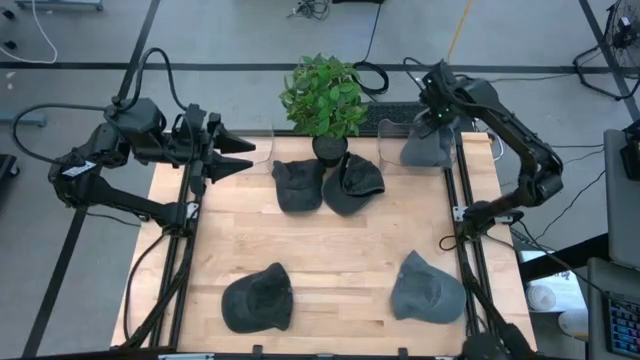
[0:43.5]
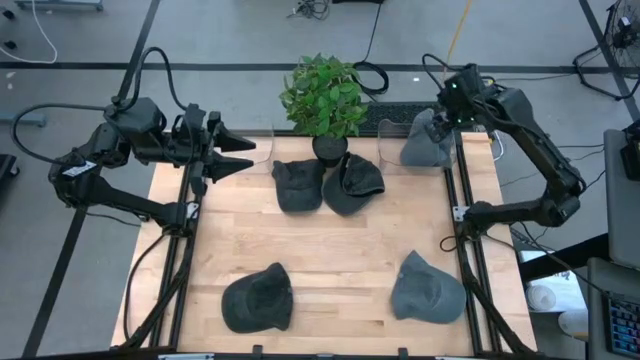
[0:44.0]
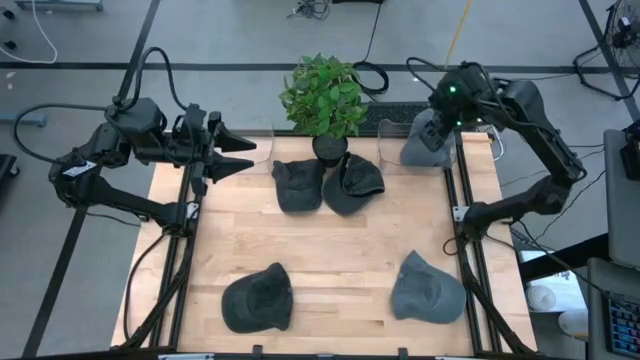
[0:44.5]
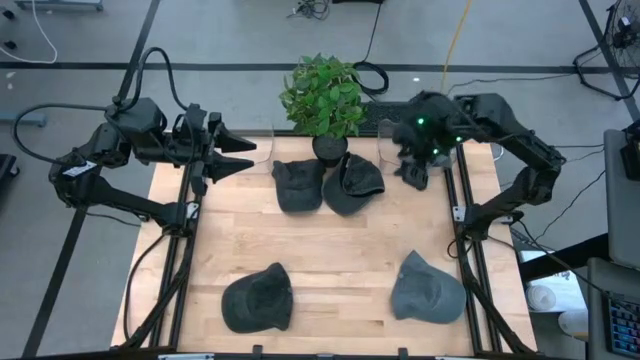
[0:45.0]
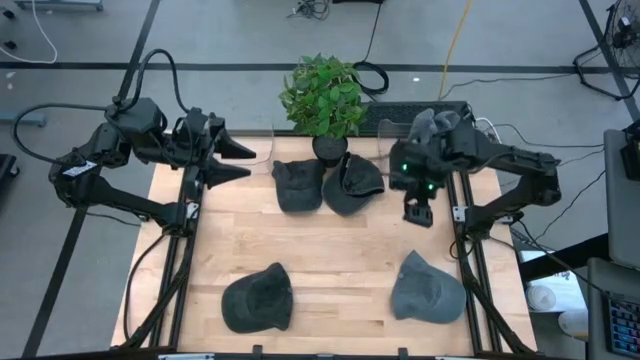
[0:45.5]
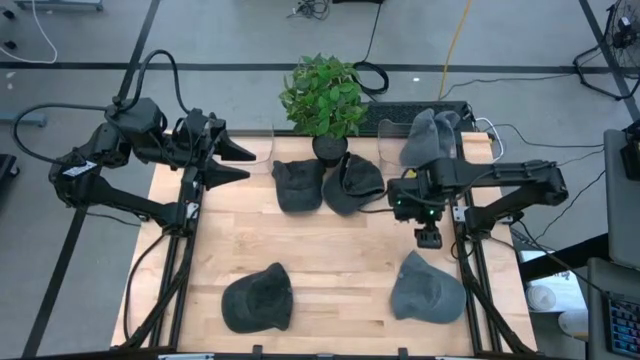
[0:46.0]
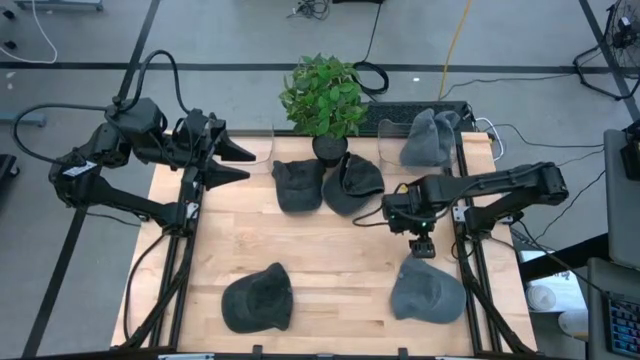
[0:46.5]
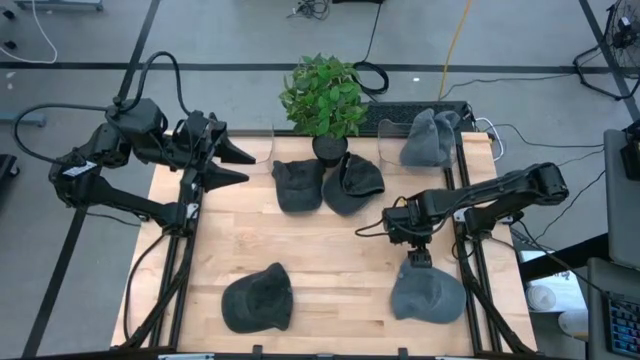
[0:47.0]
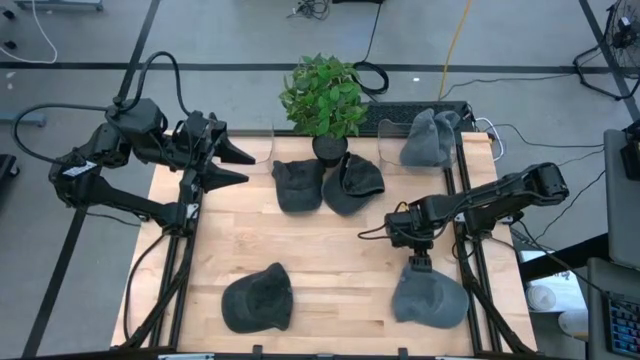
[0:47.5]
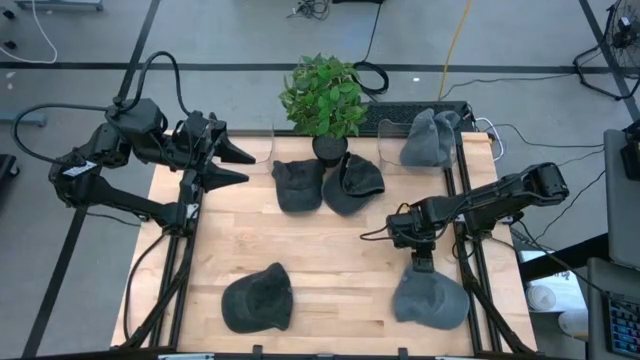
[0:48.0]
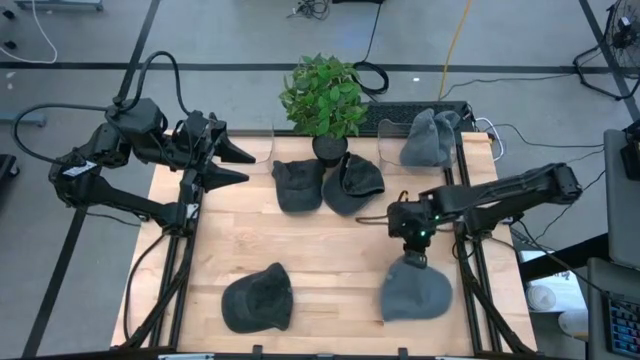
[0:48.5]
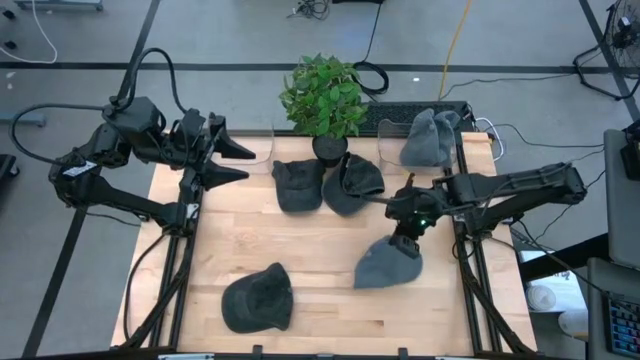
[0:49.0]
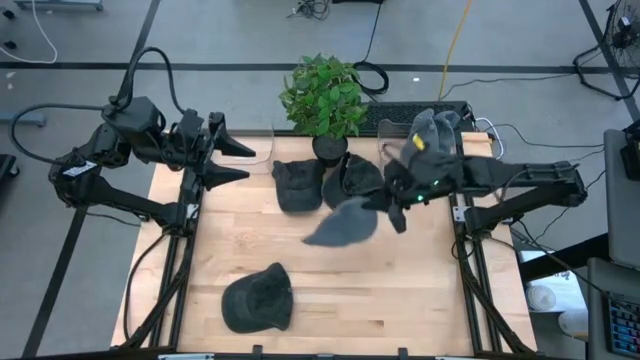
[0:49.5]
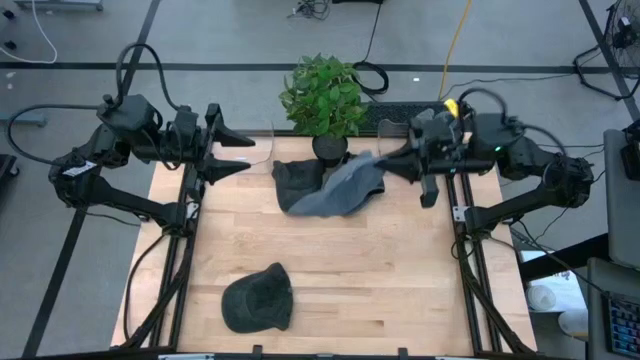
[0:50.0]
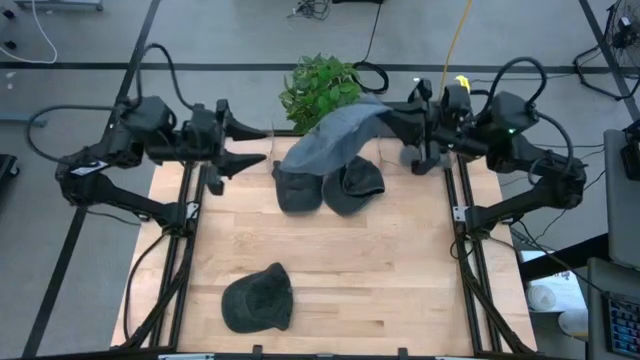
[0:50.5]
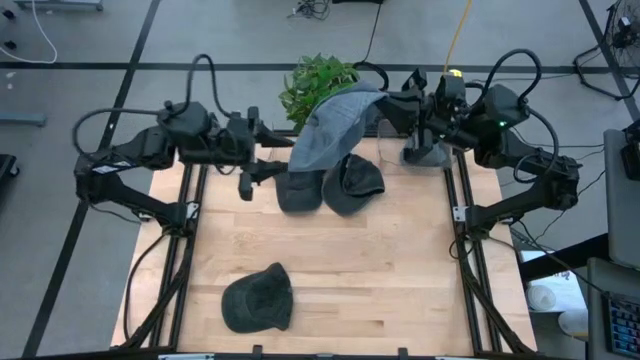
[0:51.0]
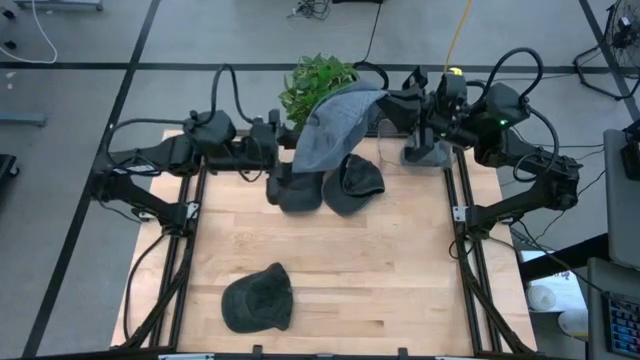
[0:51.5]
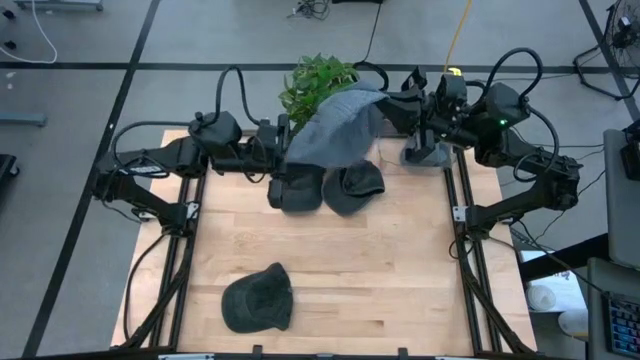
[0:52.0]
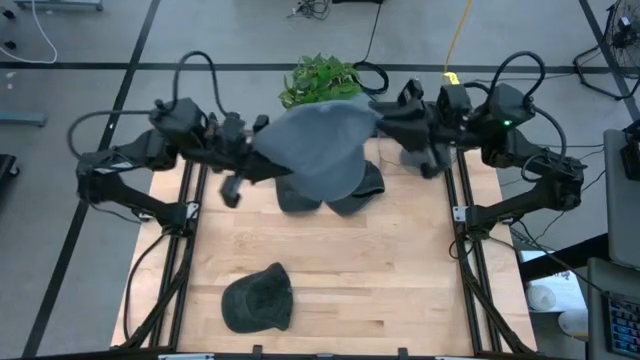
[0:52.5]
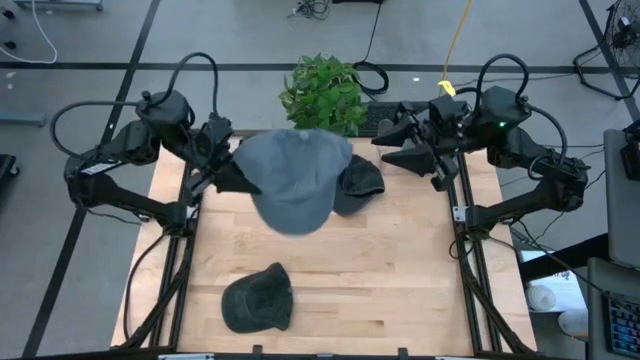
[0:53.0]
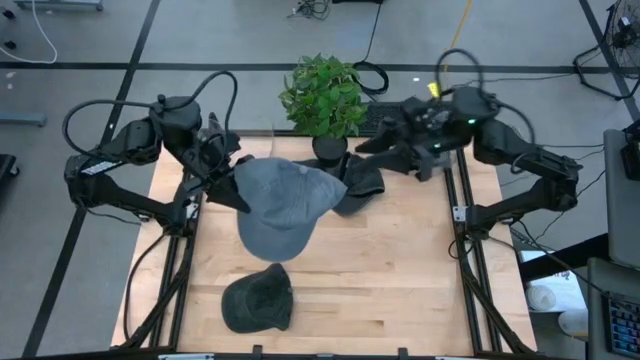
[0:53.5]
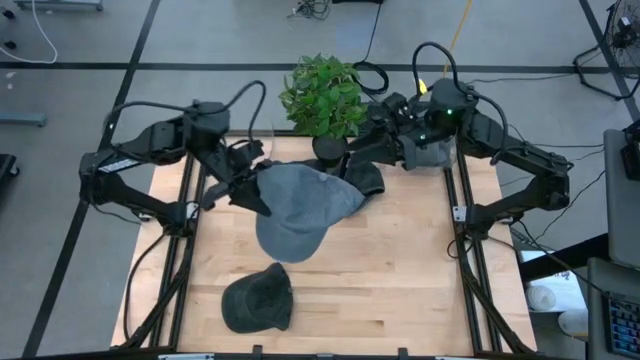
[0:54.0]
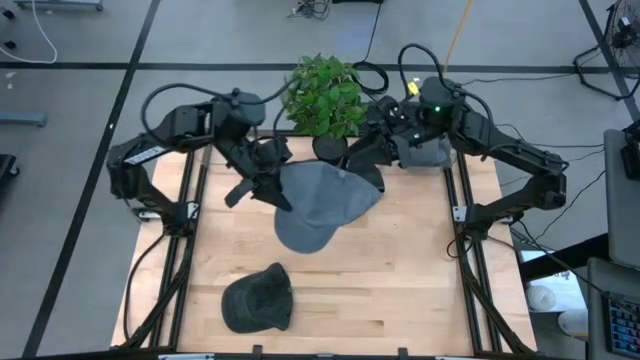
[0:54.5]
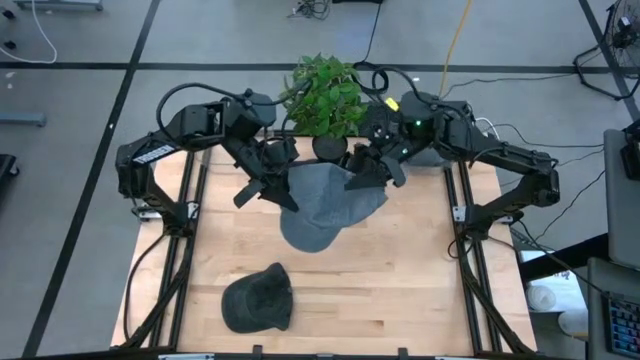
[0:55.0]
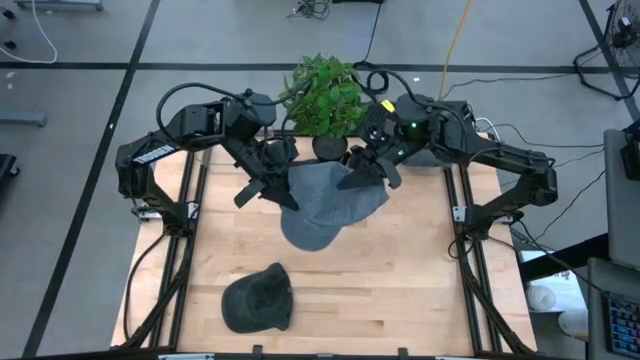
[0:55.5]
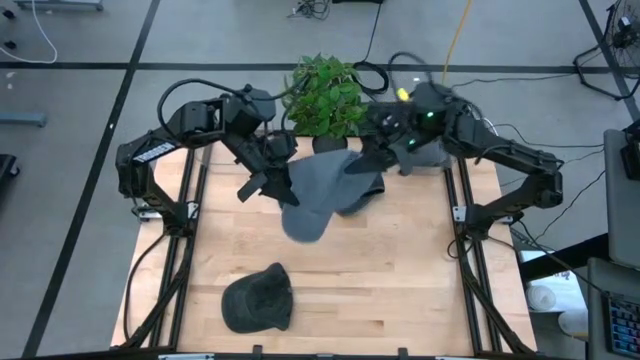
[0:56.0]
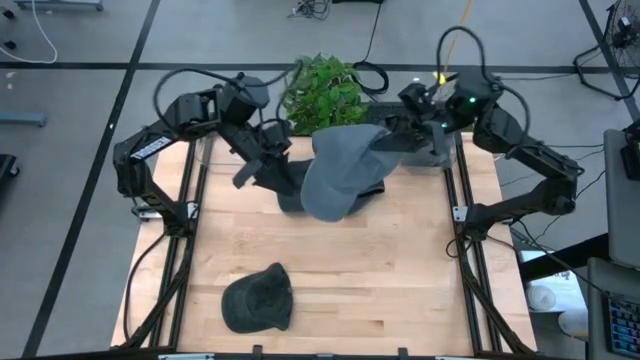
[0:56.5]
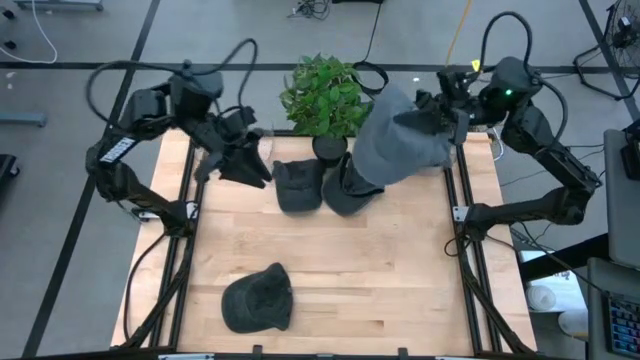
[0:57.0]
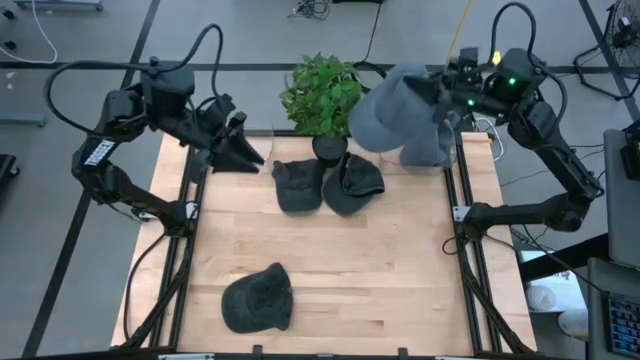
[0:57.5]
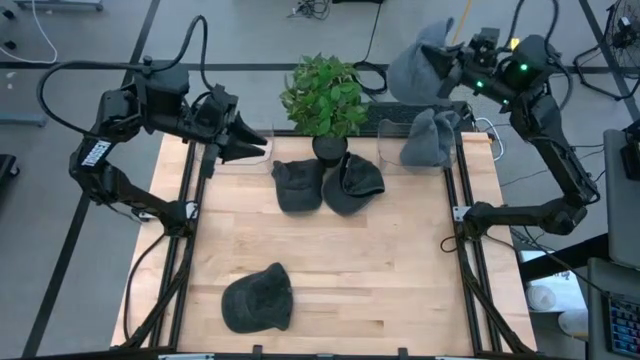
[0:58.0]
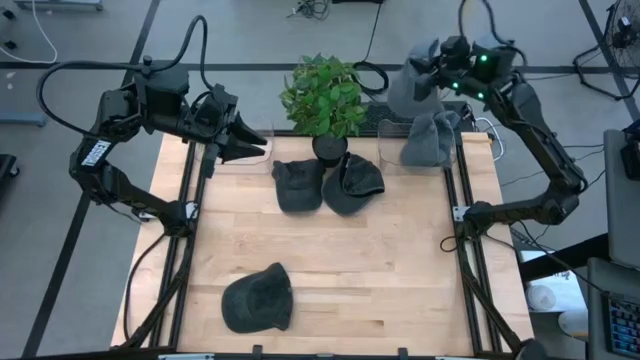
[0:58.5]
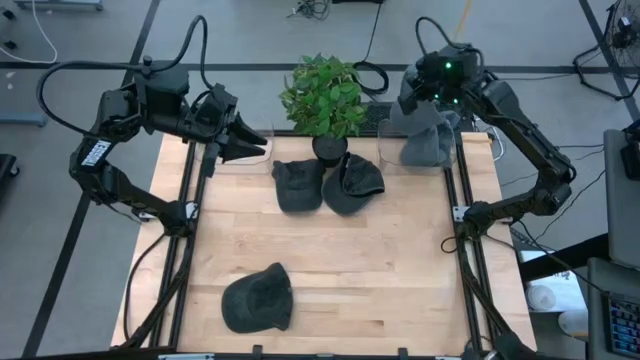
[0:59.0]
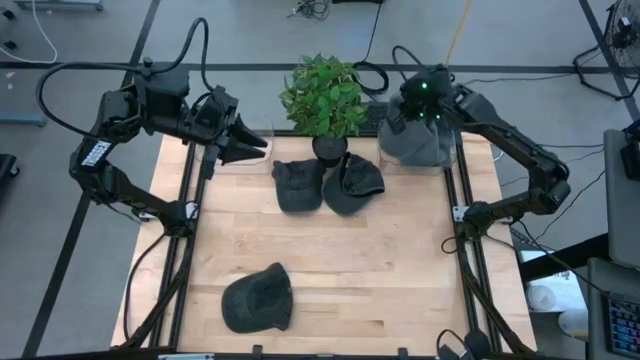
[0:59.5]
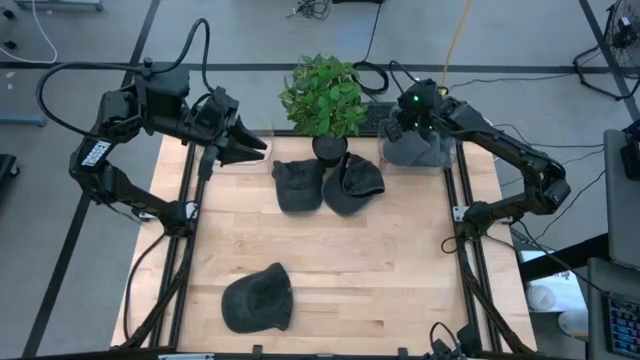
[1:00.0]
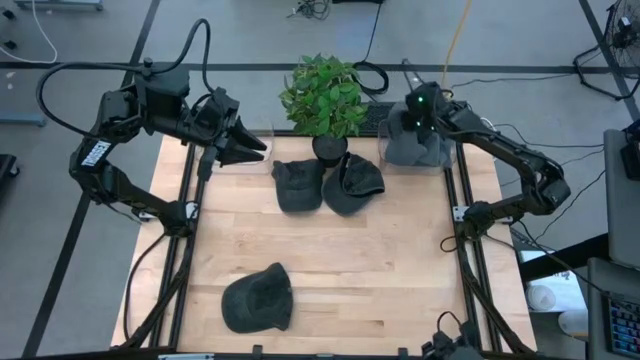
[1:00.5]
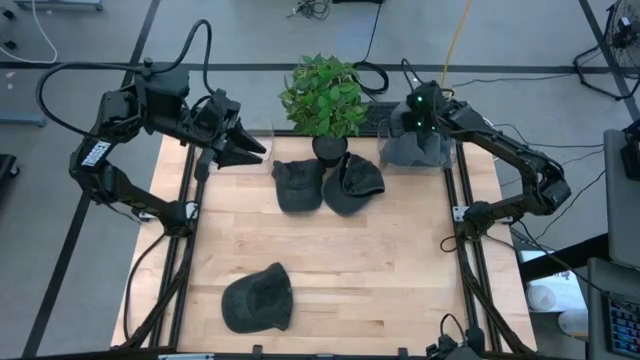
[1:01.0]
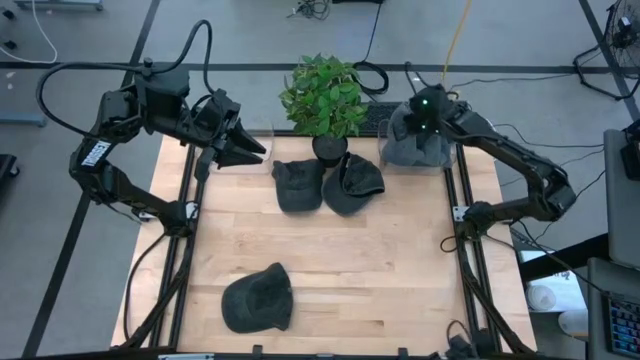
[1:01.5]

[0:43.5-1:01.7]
Task: Pick & Place hat
Put the gray cap into the right transparent bin
